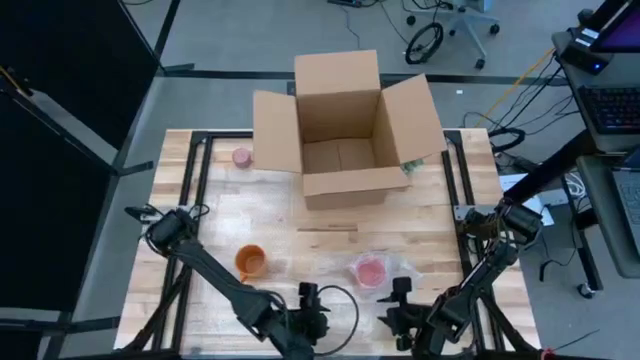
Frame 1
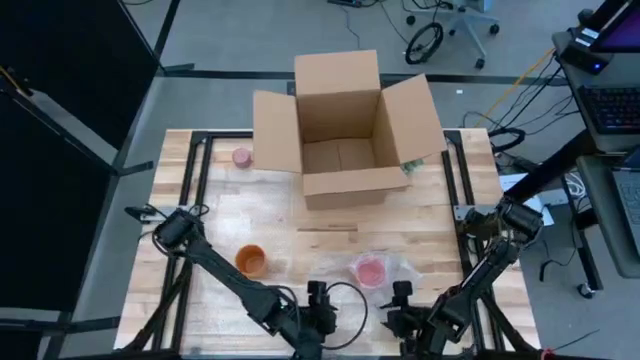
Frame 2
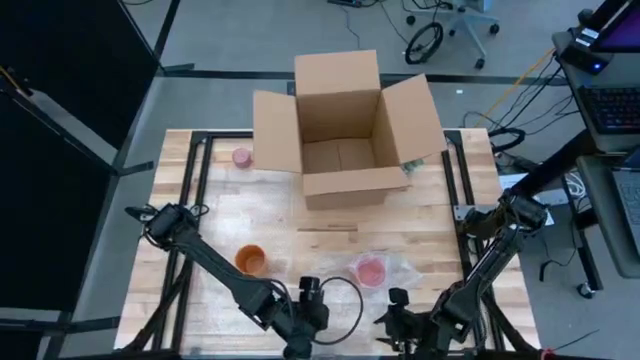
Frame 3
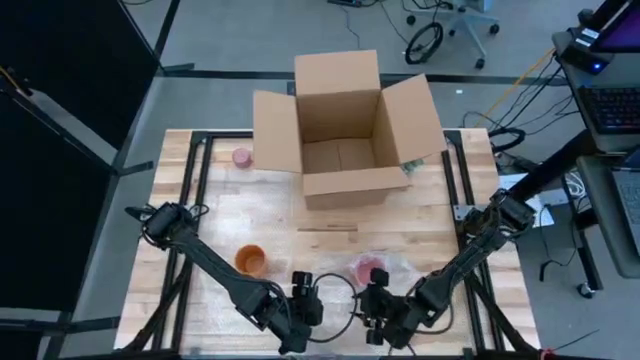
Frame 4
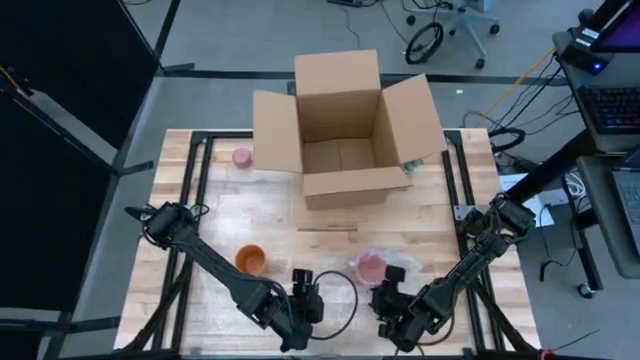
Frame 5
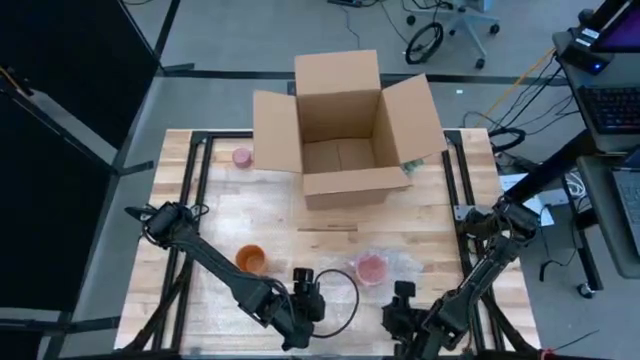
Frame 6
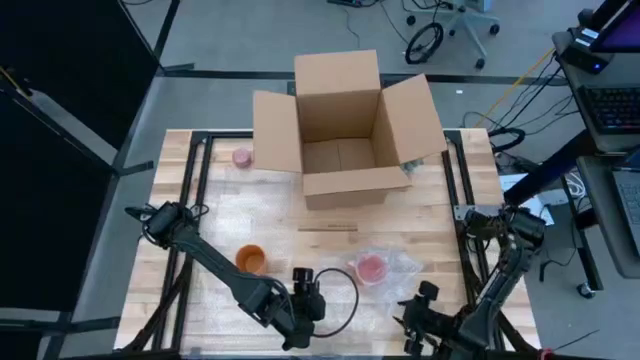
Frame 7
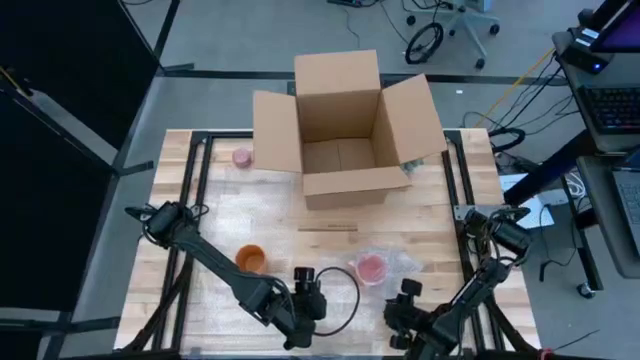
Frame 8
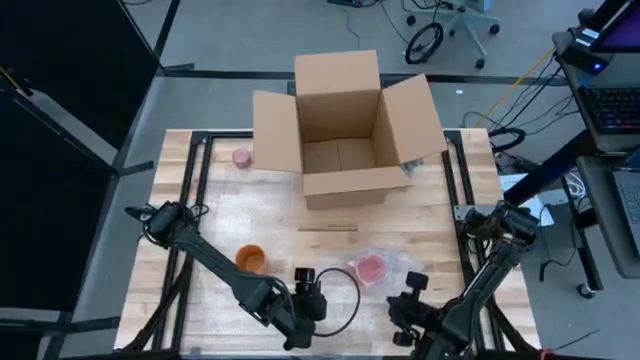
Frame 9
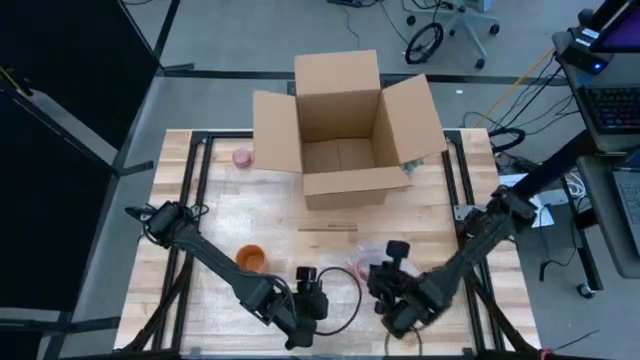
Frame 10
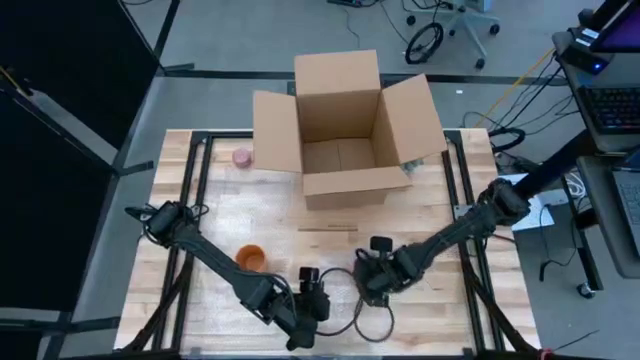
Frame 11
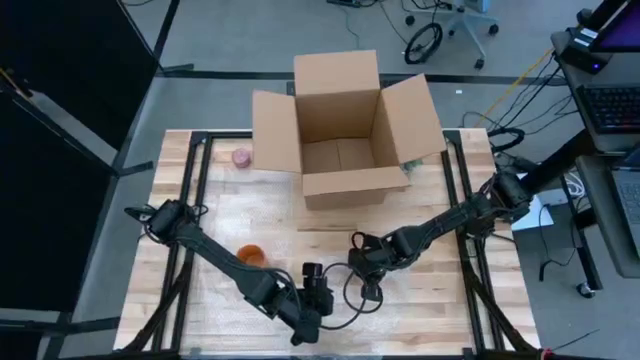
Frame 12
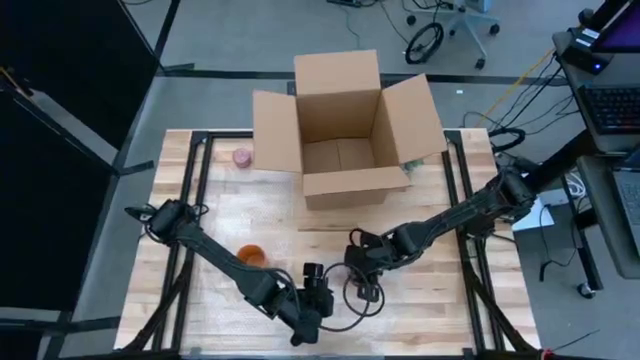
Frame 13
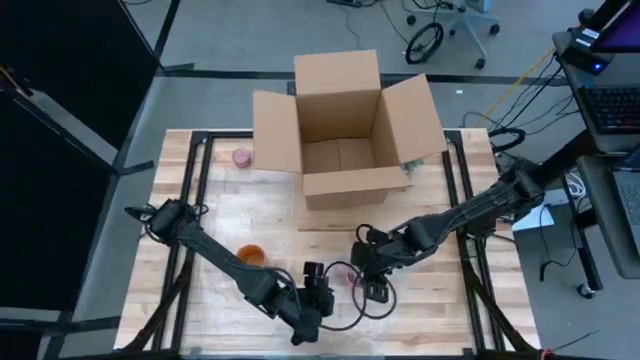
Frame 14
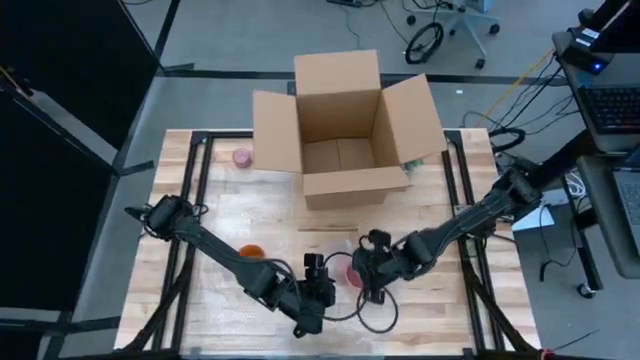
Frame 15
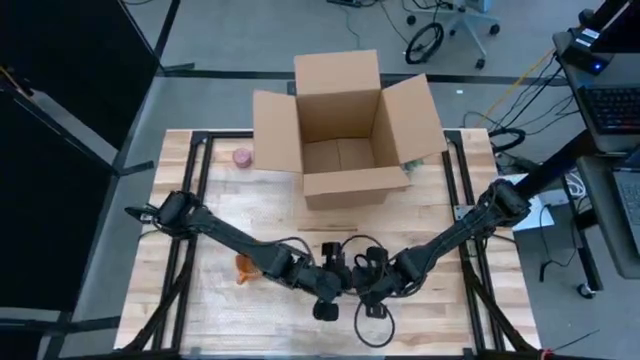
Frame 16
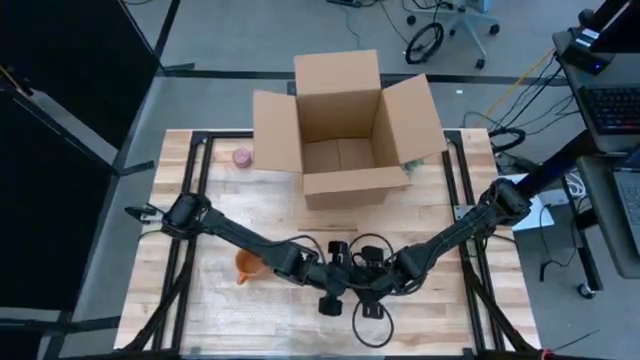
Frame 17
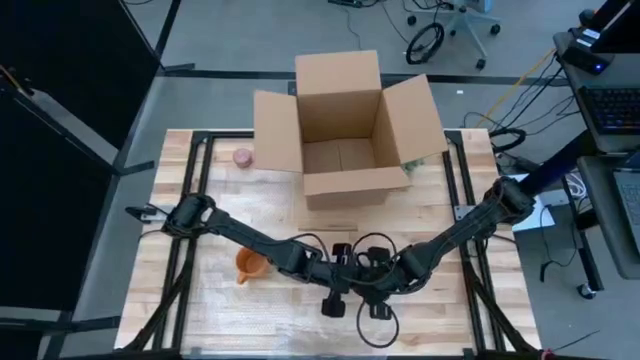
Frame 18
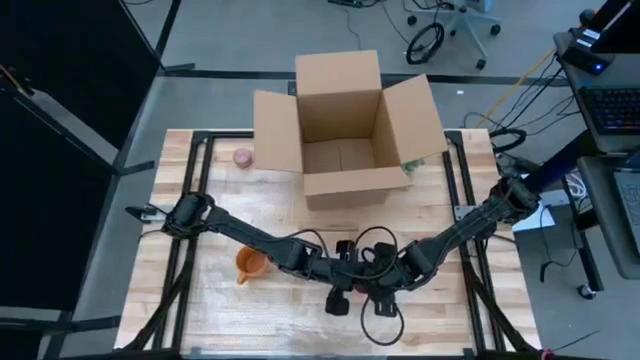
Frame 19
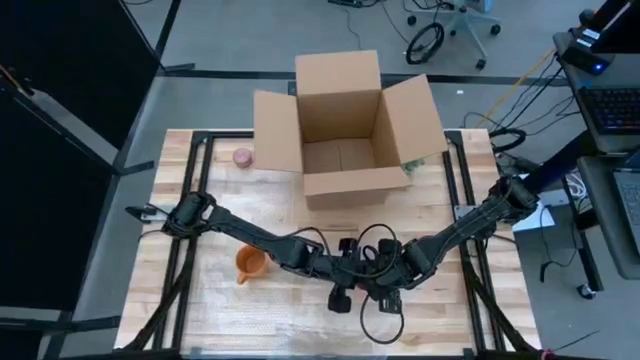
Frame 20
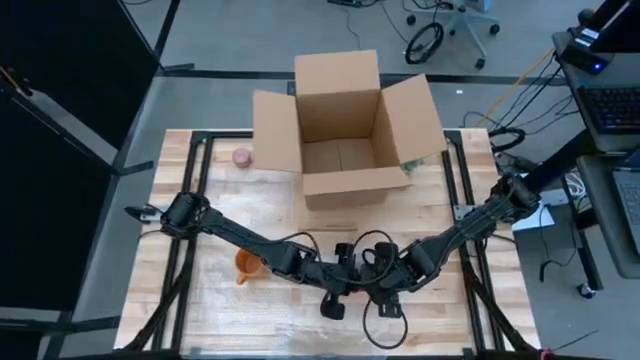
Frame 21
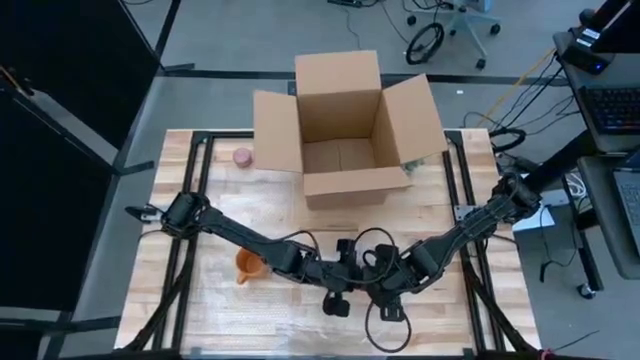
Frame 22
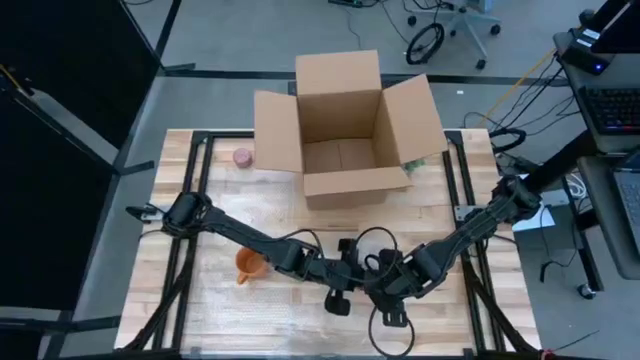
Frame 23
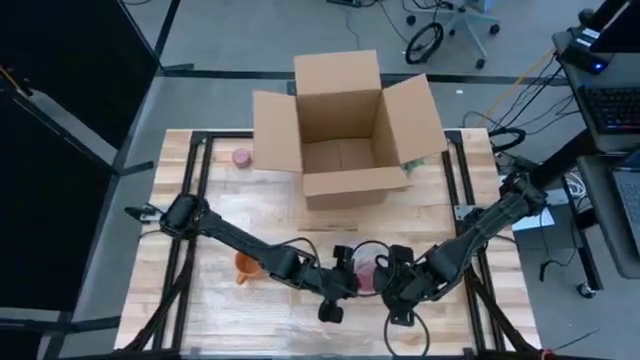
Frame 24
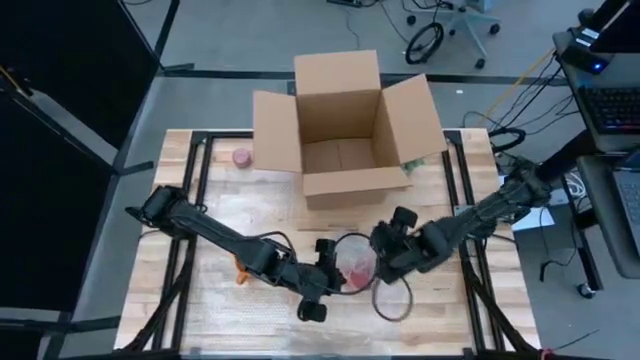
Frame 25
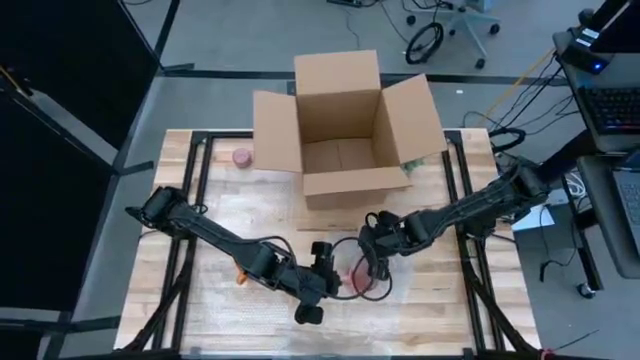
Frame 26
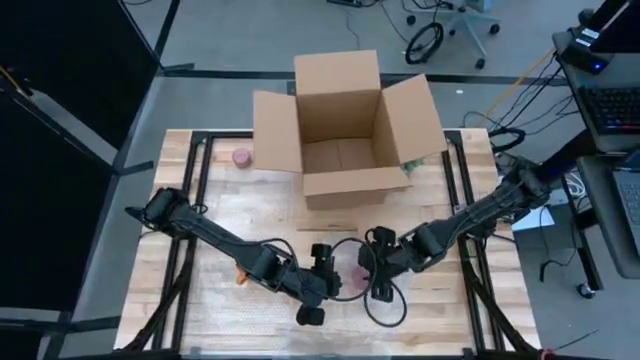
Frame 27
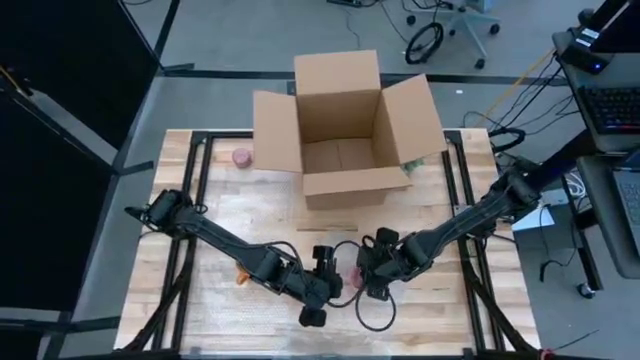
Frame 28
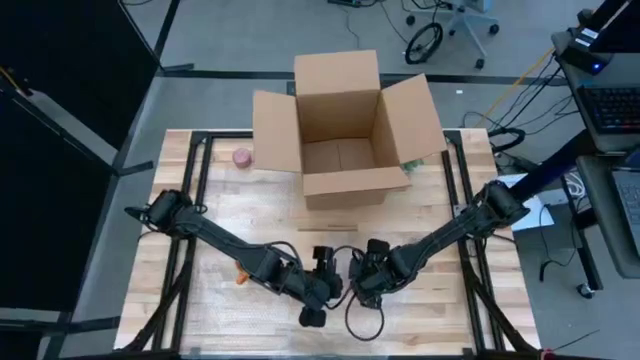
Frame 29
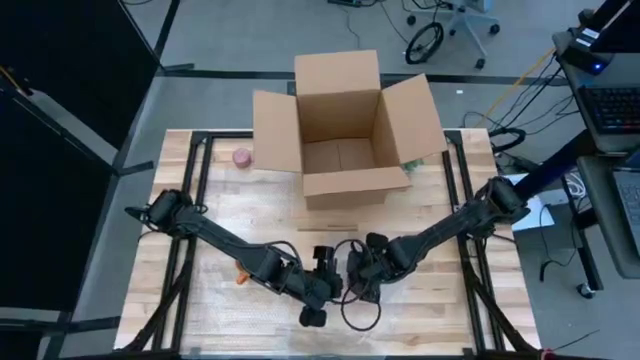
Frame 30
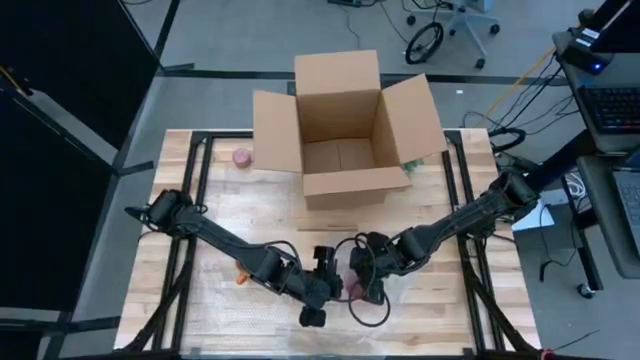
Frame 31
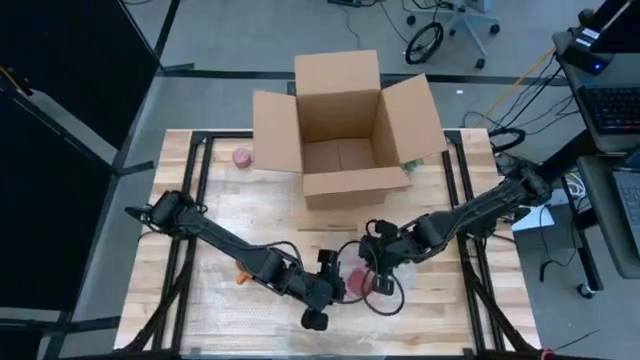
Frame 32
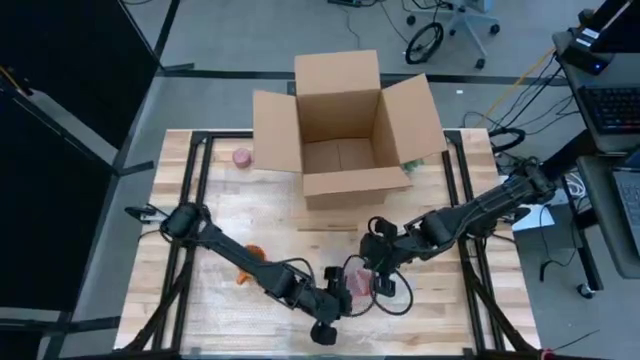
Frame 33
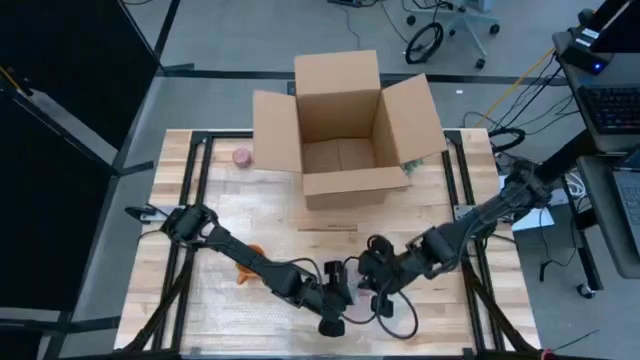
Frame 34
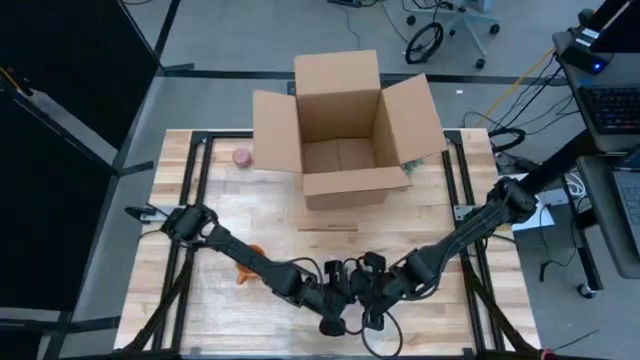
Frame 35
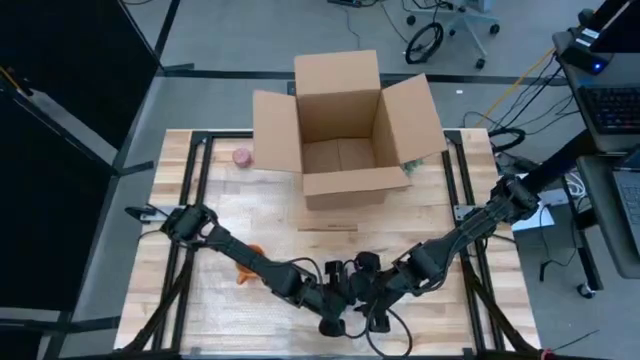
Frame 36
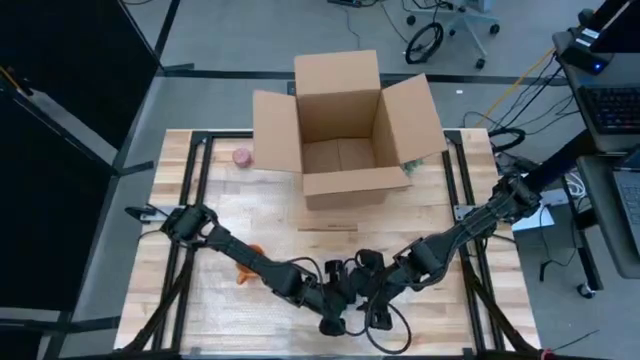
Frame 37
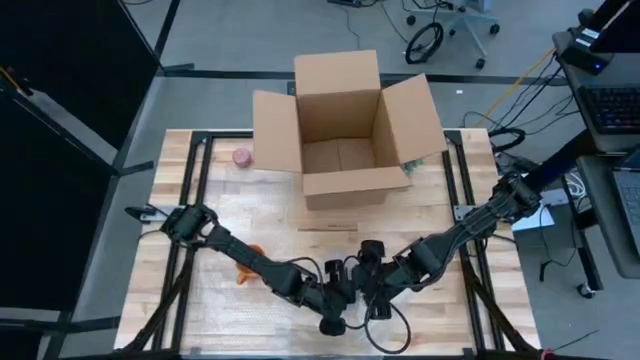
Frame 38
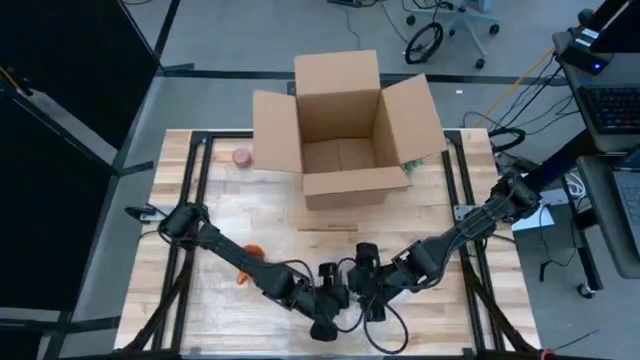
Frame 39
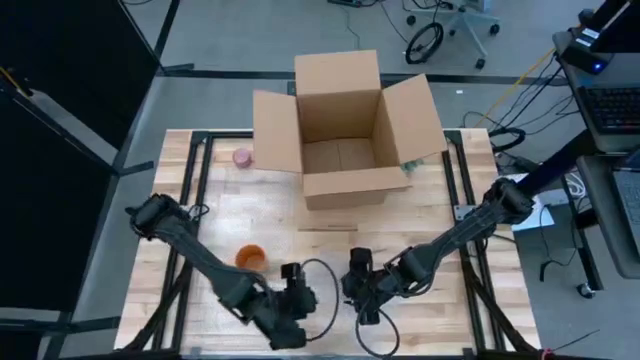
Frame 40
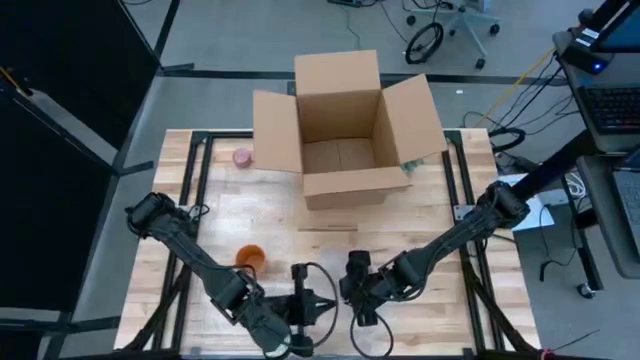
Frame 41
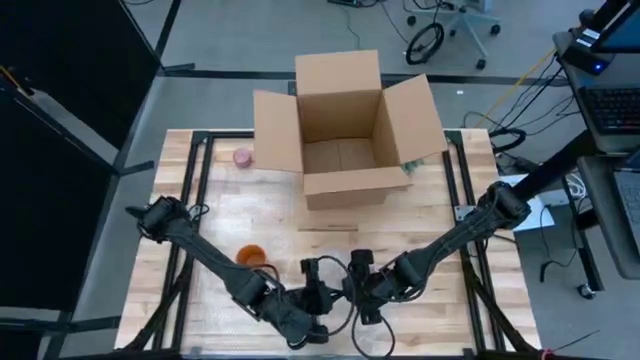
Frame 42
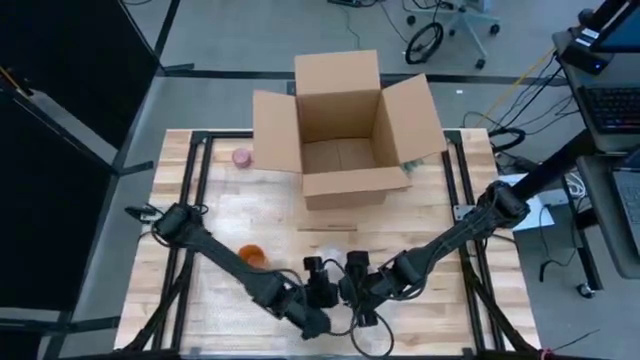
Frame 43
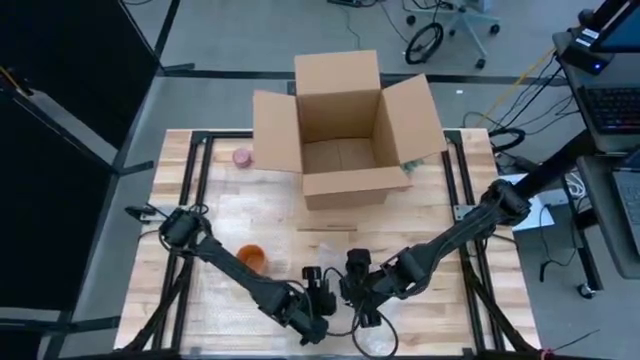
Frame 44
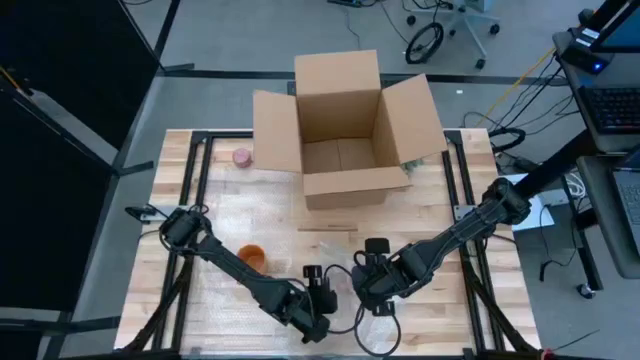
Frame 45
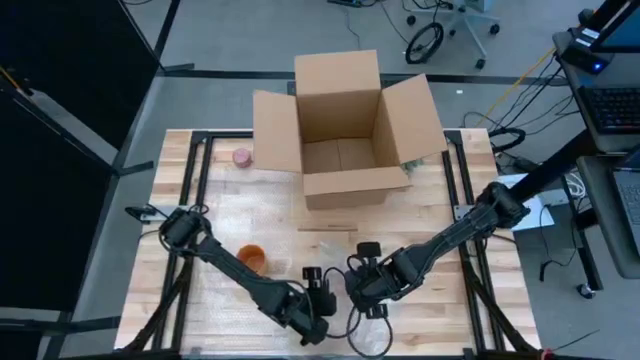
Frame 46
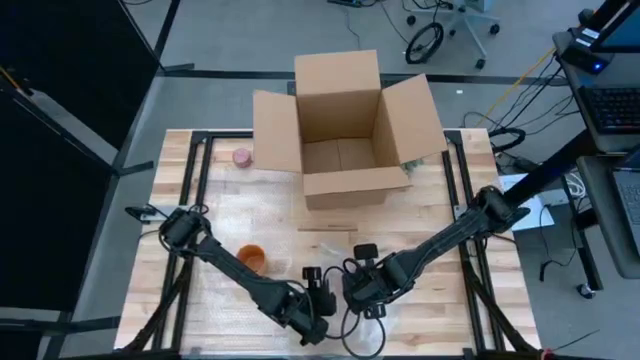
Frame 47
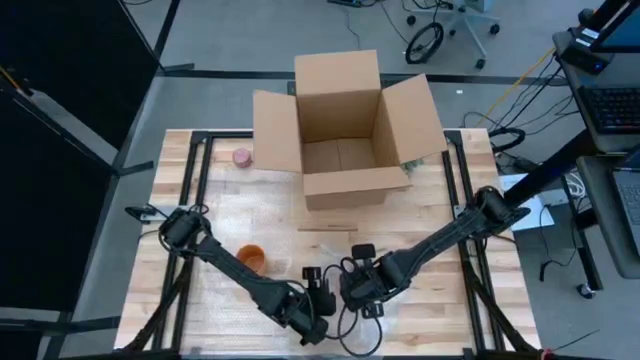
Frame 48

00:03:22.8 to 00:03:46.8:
Task: wrap mug
Wrap the pink cup with the bubble wrap
